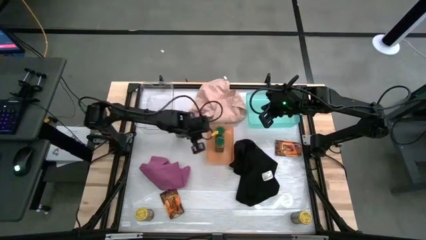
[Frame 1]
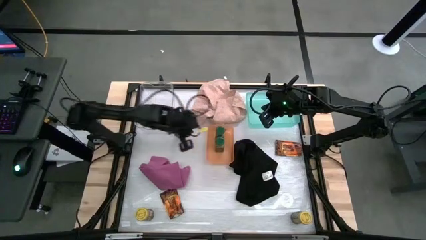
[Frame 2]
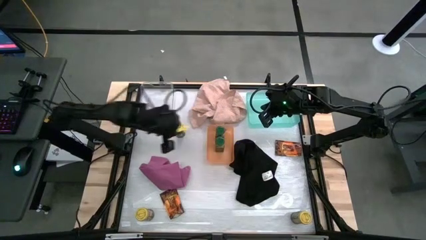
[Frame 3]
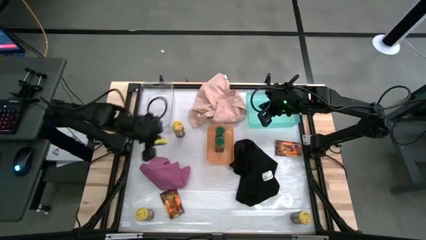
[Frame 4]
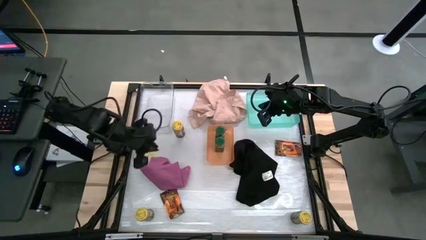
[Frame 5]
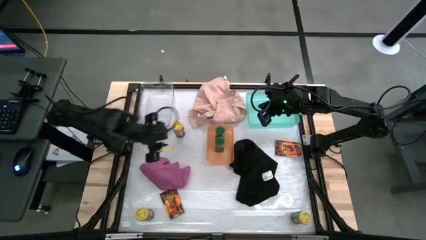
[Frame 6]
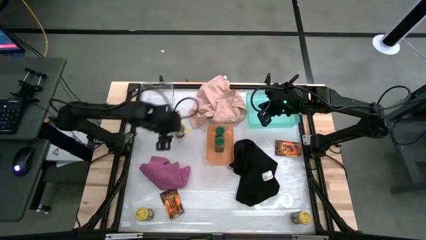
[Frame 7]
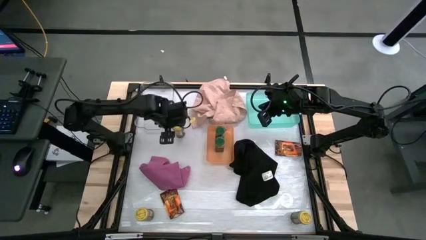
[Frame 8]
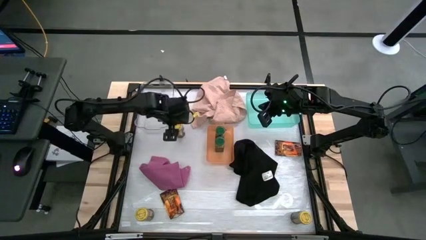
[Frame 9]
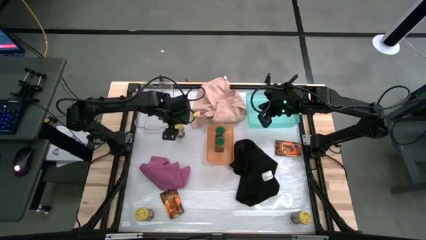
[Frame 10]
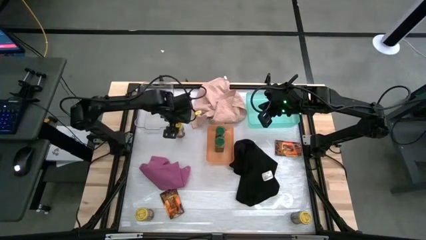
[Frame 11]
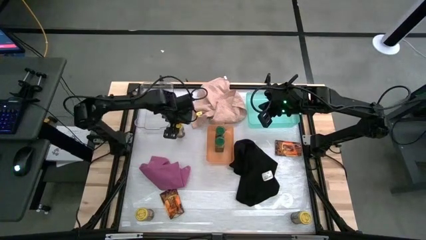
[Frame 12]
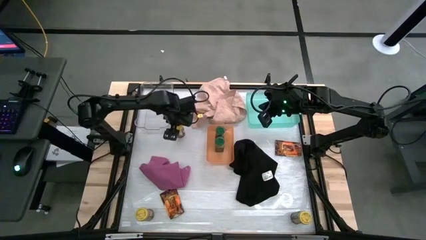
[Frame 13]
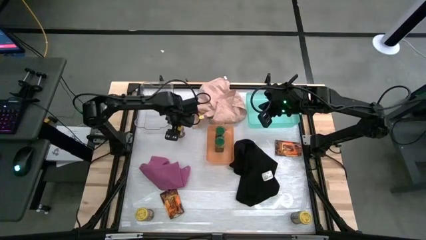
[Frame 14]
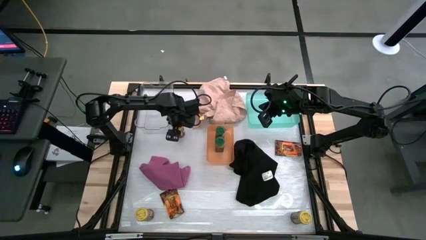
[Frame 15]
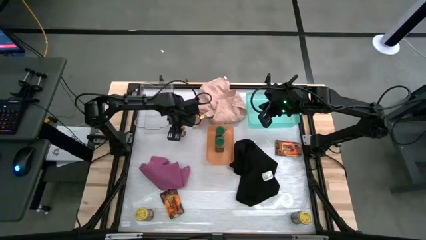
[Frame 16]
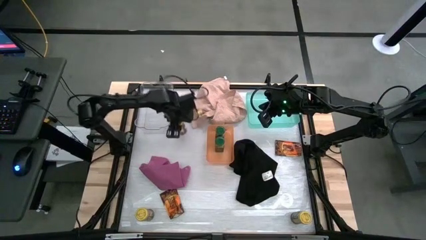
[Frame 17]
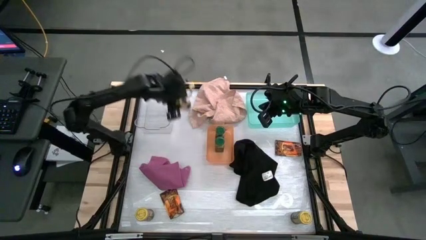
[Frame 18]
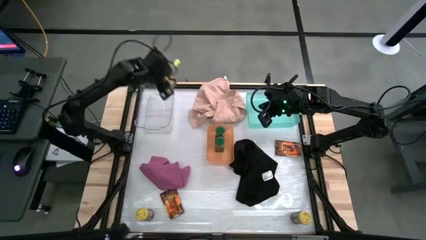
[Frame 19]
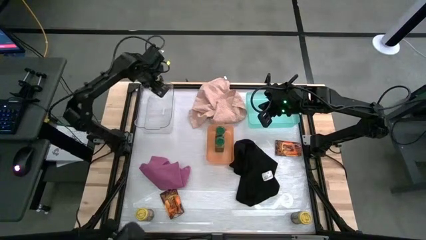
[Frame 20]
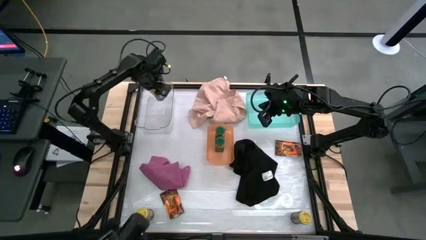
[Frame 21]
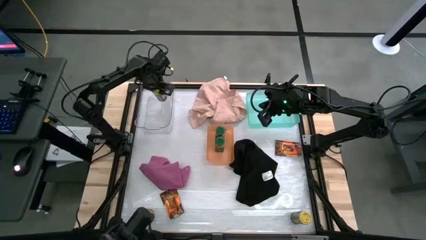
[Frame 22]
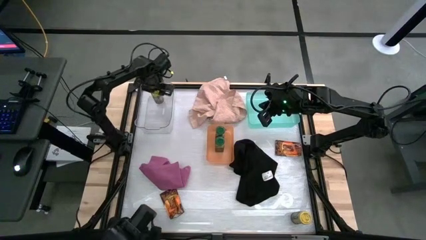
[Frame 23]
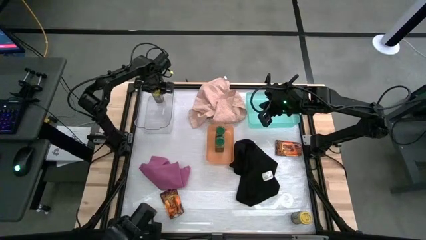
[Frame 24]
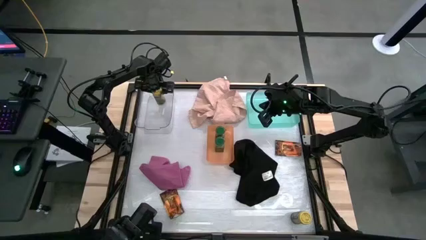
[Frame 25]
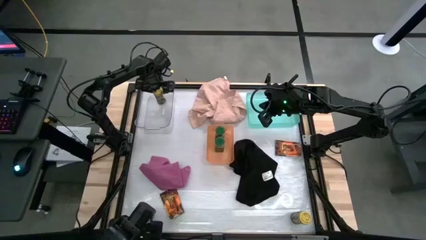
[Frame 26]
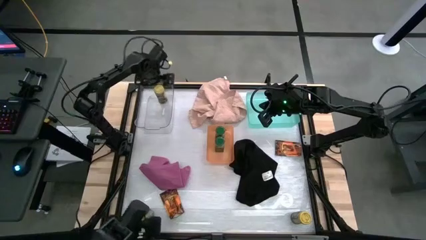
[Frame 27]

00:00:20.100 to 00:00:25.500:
Task: Sort spices by type
Put the top left yellow seasoning bottle into the transparent bin

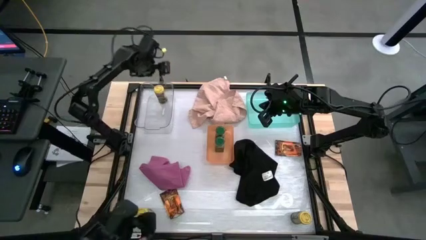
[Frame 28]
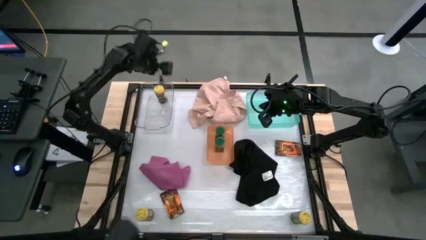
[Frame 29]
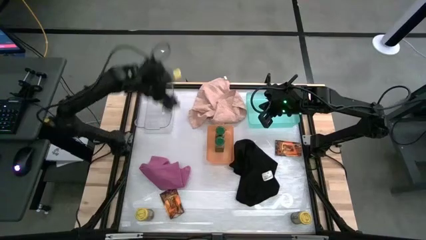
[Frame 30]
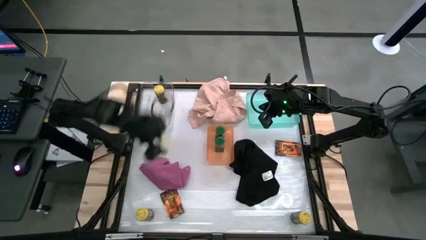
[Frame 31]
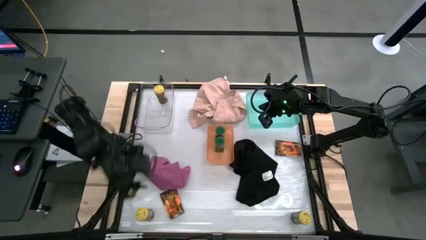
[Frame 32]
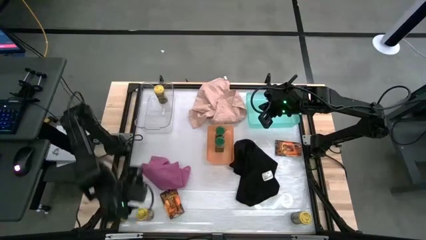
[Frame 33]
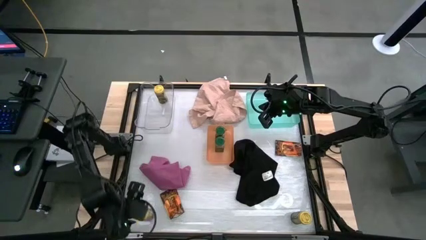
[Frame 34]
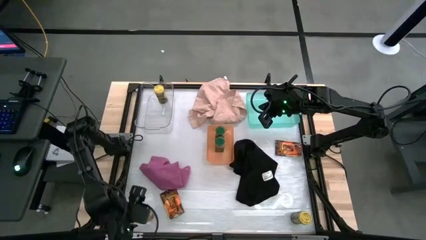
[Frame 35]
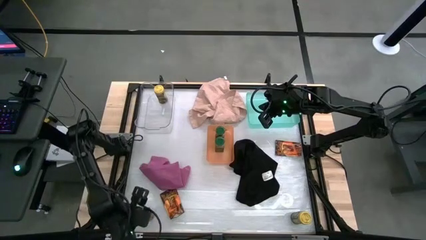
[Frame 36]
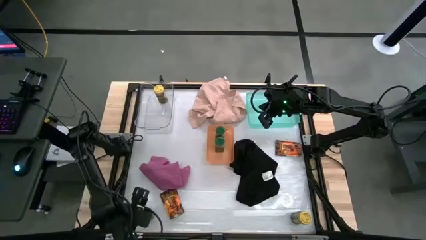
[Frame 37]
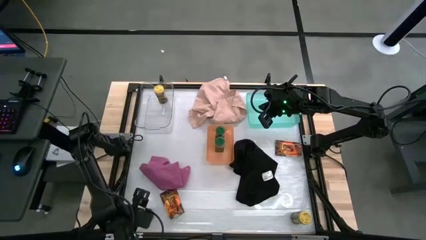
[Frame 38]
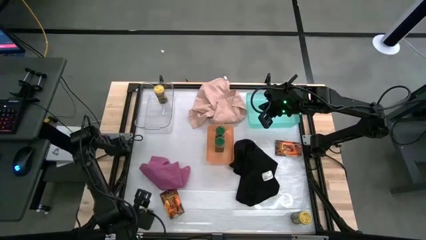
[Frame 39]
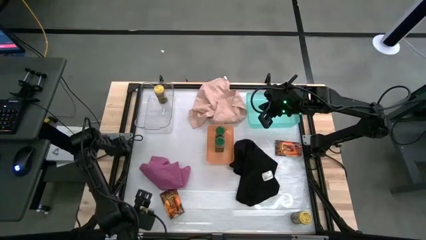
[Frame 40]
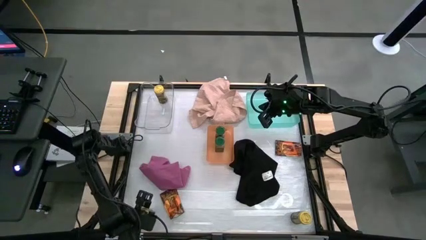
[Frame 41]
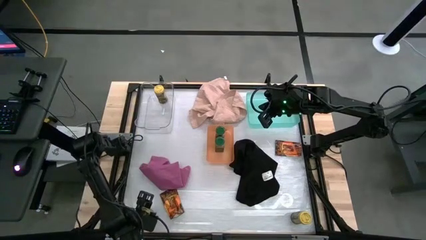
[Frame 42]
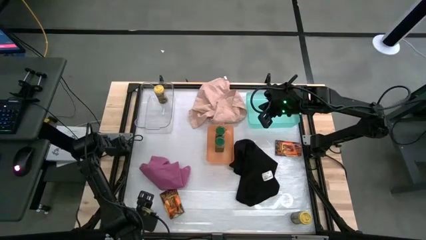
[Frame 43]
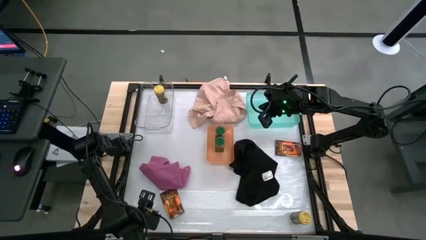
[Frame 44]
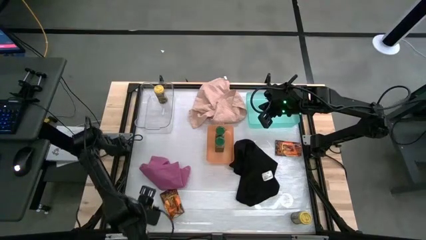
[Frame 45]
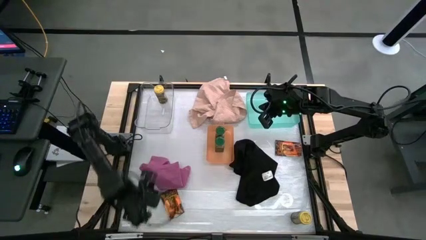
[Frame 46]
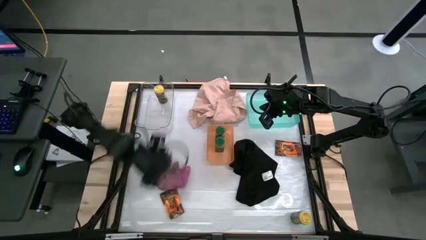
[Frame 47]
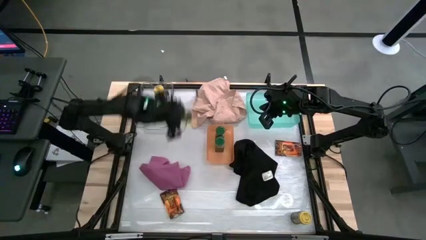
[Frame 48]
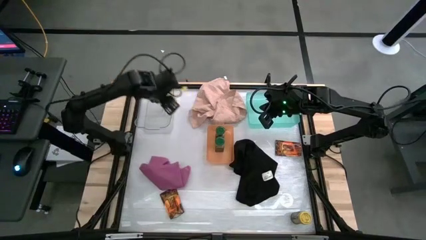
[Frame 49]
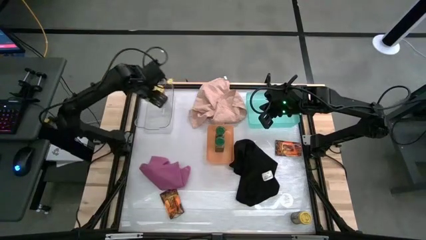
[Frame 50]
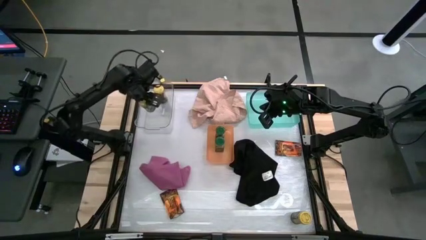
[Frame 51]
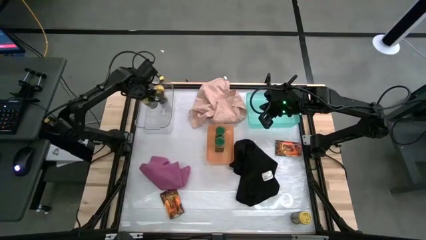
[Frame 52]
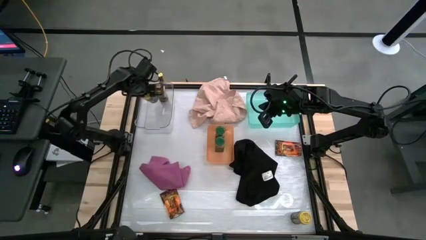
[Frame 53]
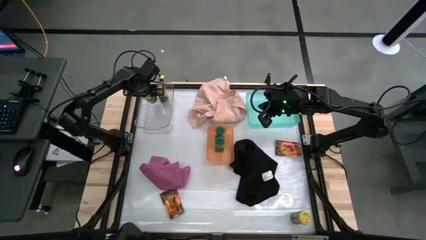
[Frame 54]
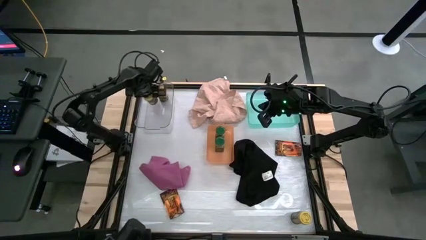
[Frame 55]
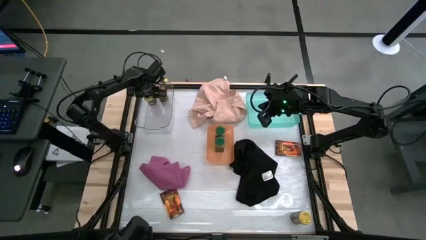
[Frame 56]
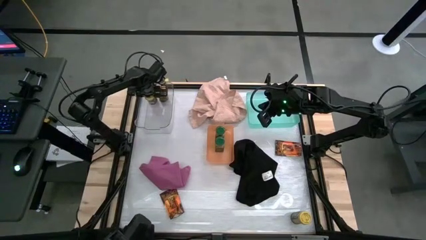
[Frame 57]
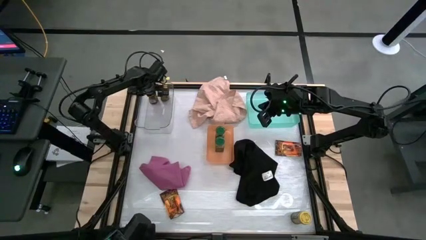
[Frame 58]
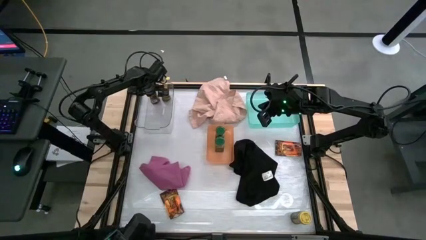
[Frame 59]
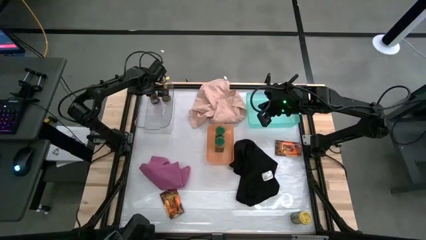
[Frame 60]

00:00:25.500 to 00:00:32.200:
Put the left yellow seasoning bottle into the transparent bin

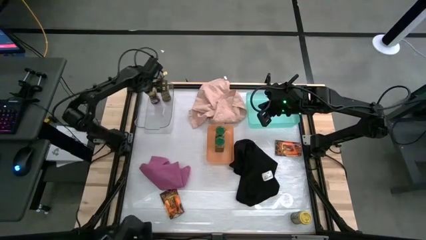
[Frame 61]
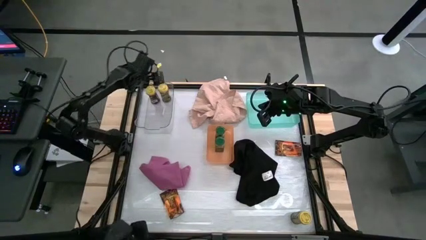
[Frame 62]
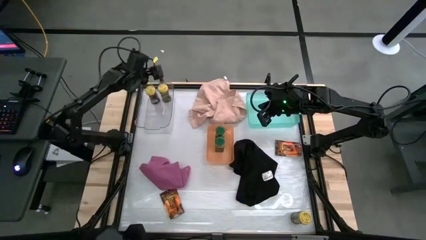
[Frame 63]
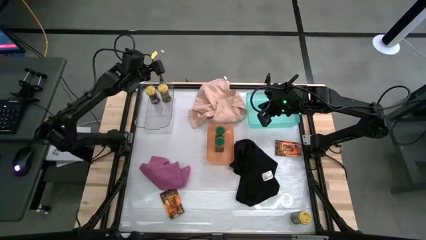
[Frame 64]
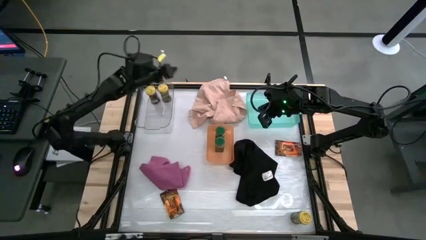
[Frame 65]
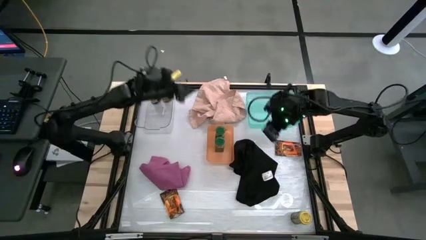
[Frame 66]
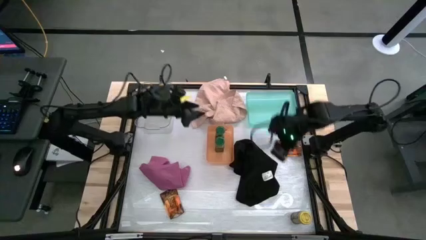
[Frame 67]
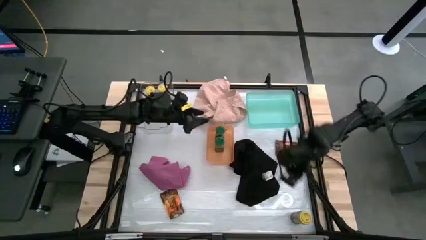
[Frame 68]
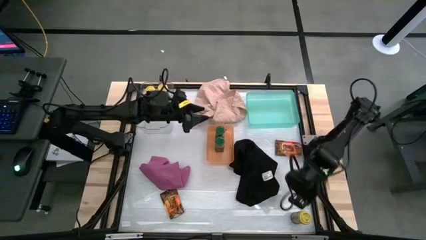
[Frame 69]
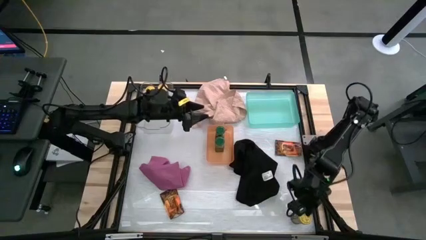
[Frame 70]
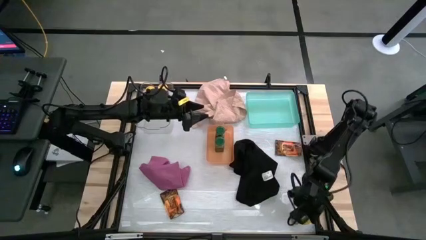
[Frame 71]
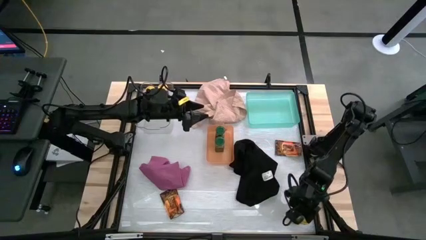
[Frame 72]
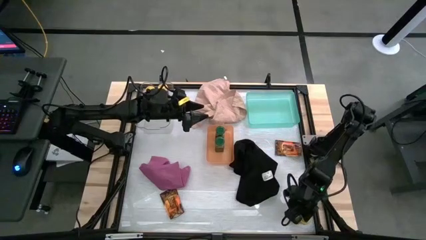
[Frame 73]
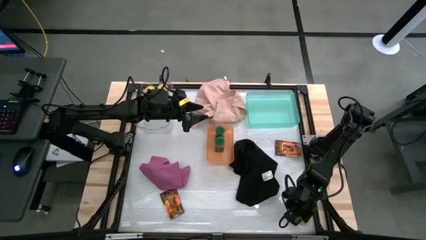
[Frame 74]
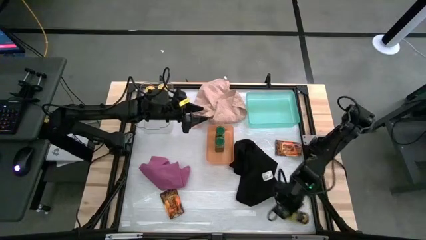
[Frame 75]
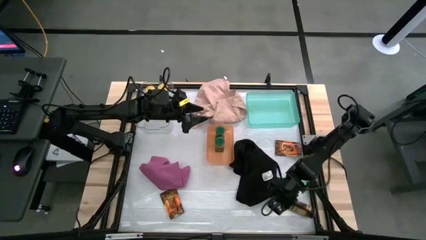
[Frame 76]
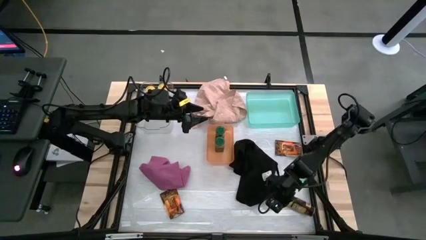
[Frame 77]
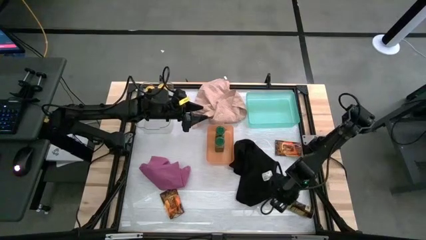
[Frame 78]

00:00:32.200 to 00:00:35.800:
Put the yellow seasoning bottle into the transparent bin

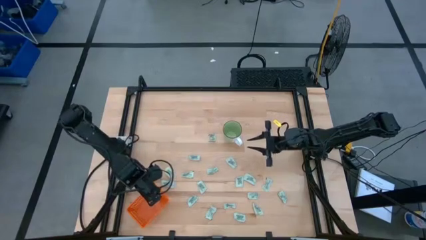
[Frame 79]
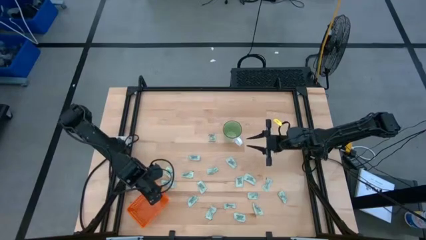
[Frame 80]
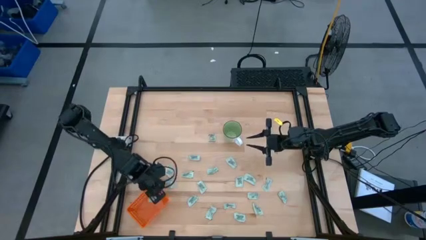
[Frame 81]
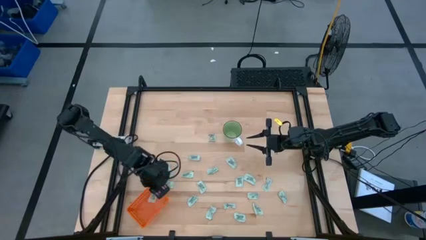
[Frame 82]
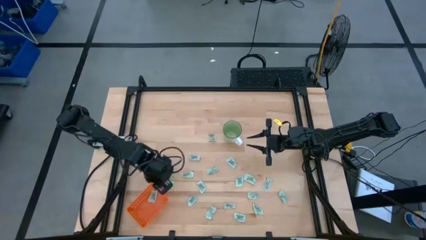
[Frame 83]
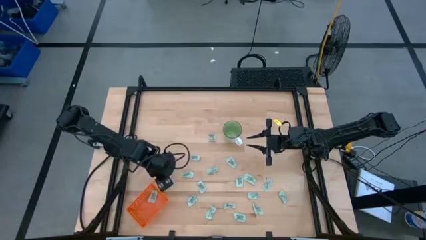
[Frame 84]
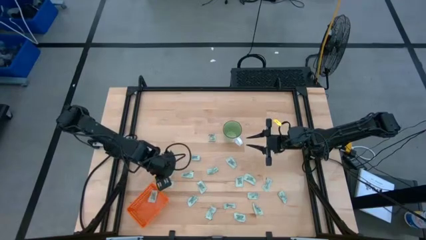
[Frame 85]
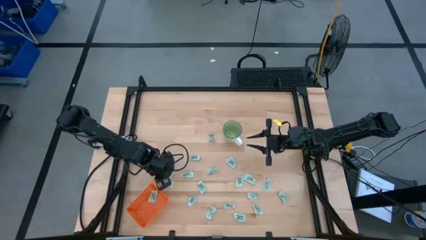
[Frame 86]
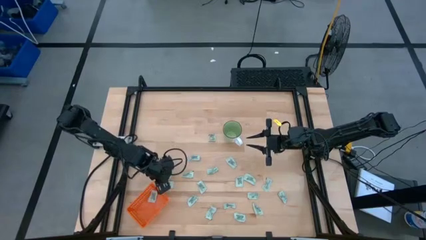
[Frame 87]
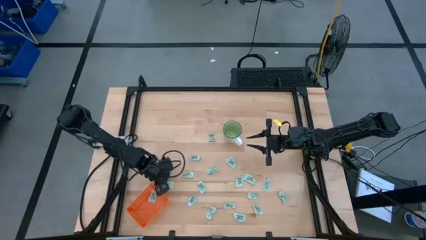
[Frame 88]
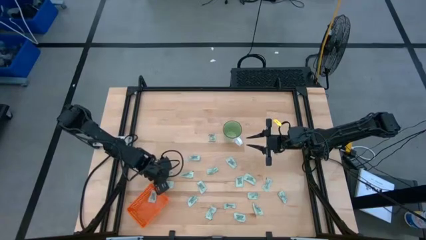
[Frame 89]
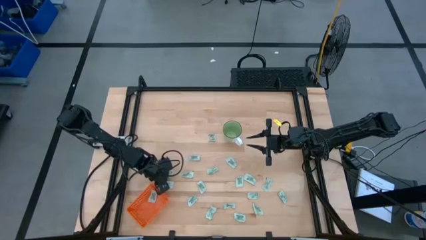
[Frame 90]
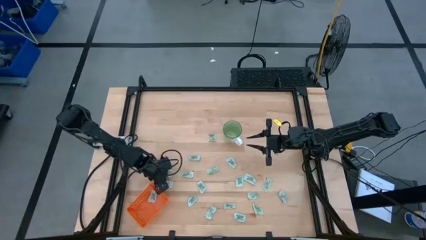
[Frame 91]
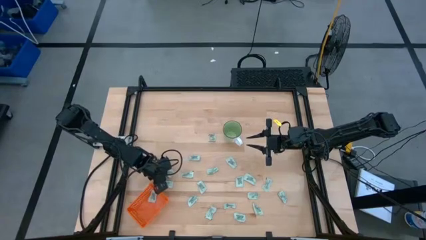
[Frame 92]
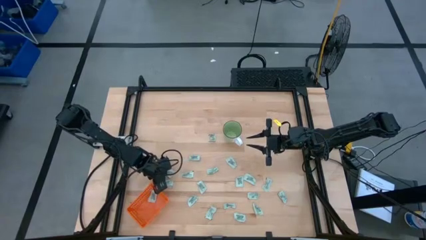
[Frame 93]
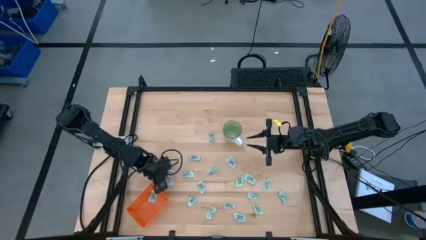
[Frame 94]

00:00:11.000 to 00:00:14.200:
Task: Pick and place Stevia / Truvia into bins
Put the light green stevia packet into the orange basket
